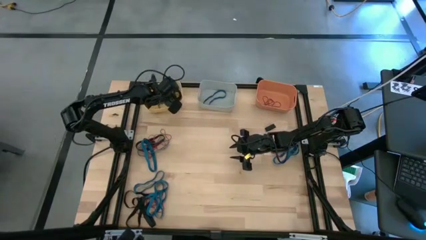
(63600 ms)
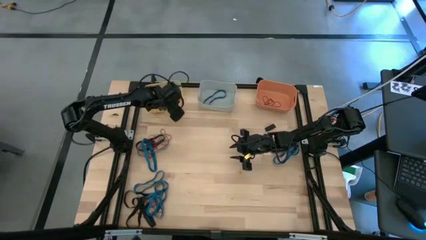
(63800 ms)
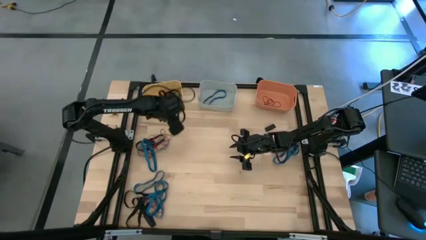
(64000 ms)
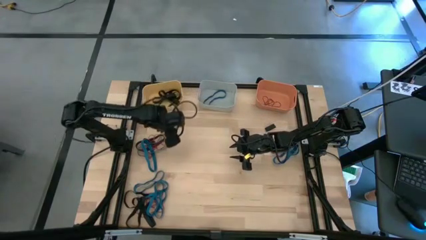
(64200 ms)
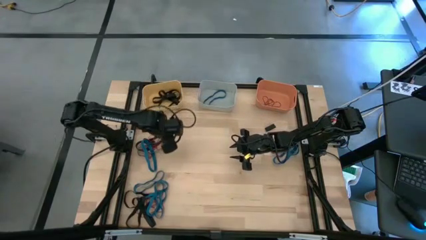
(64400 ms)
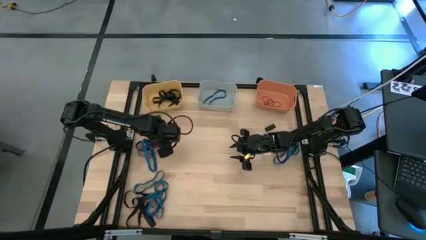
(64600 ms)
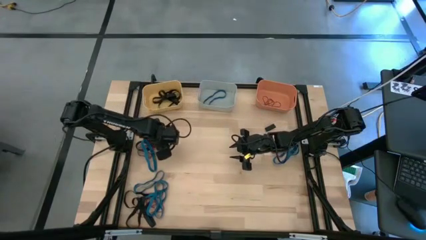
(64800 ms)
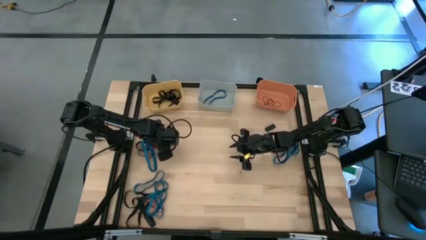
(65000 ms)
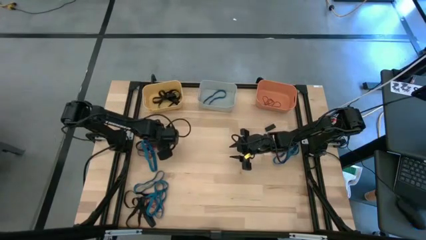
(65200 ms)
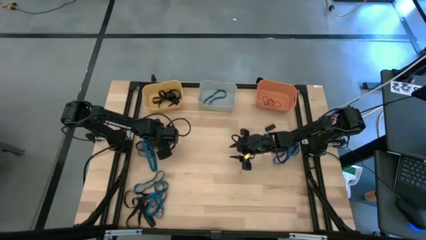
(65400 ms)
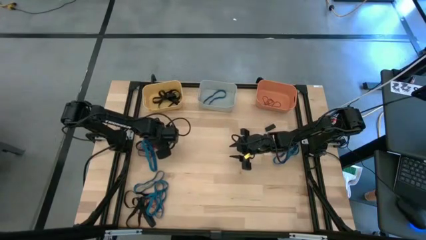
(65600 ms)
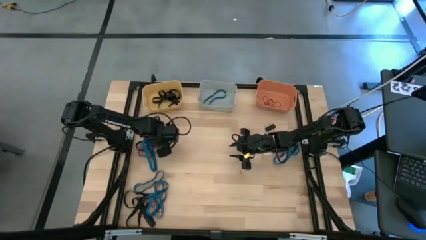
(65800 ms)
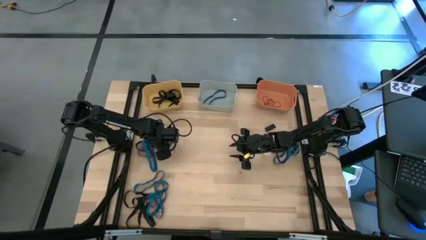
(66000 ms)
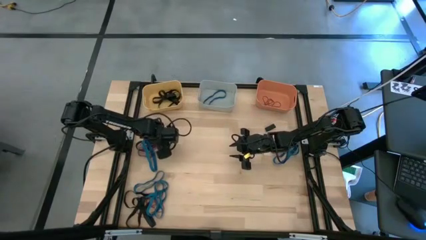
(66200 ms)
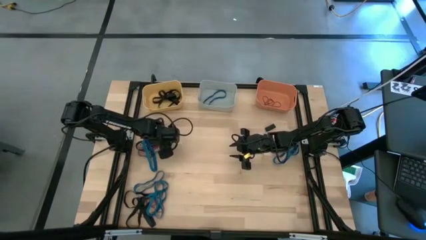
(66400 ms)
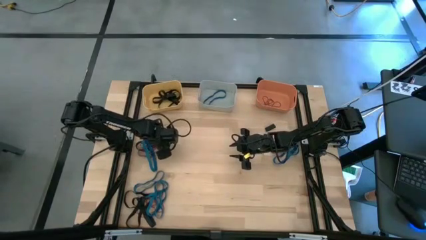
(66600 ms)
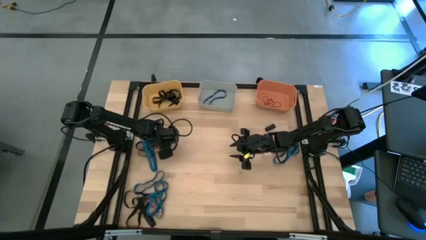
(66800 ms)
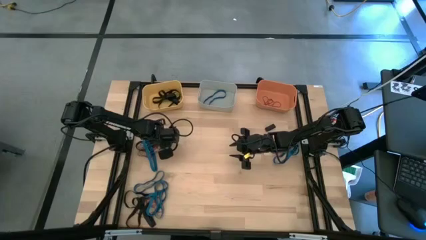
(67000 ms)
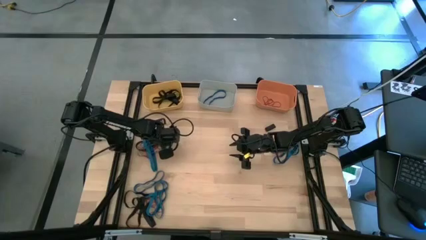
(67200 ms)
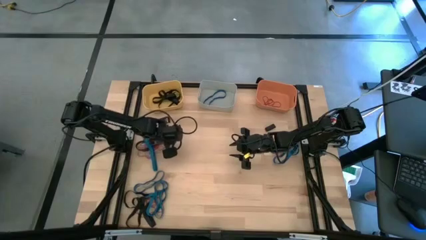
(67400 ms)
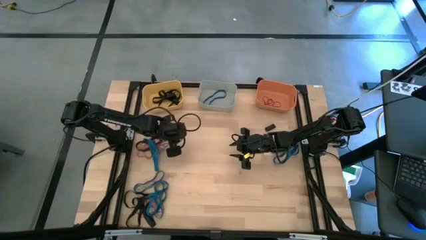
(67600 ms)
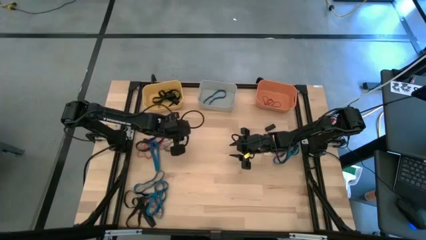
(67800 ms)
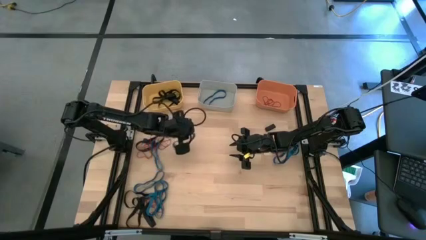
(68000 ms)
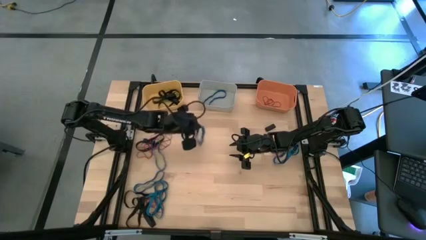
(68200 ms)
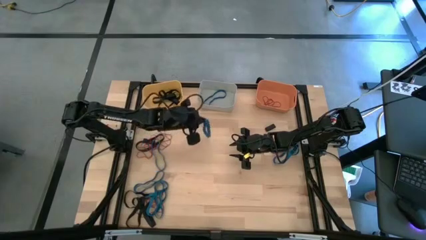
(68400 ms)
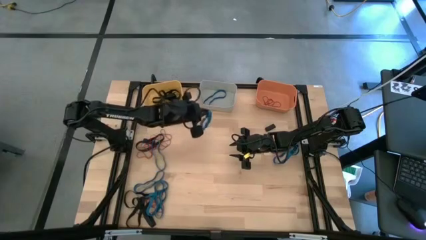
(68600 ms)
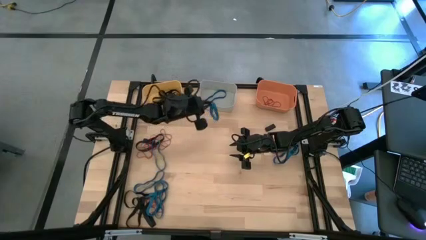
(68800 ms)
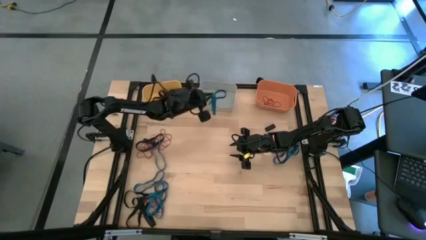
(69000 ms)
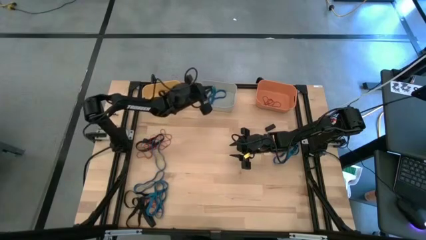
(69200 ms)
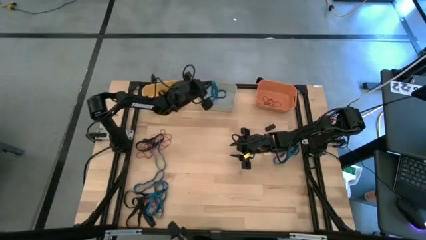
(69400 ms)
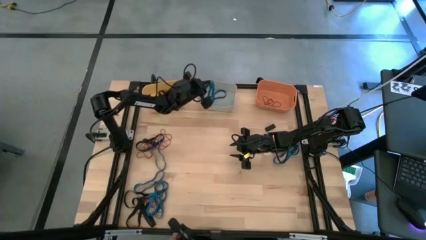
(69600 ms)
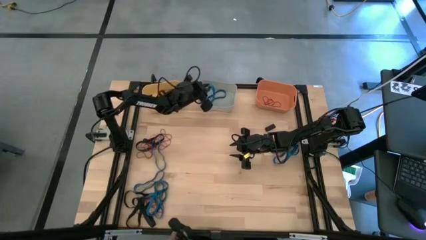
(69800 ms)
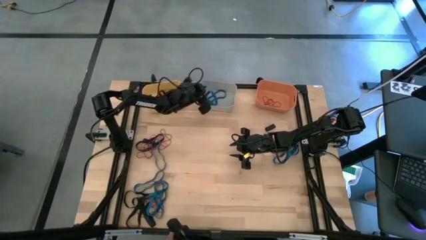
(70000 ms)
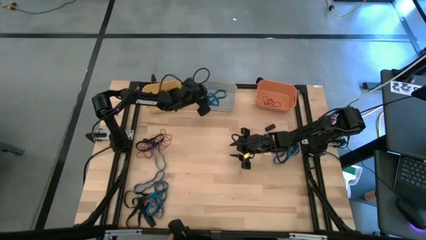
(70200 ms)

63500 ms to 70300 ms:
Task: Sort rubber bands into baskets
Put the blue rubber band into the grey bin

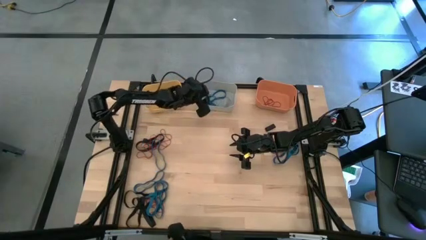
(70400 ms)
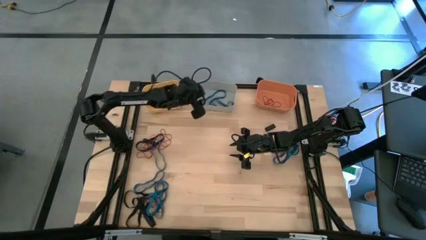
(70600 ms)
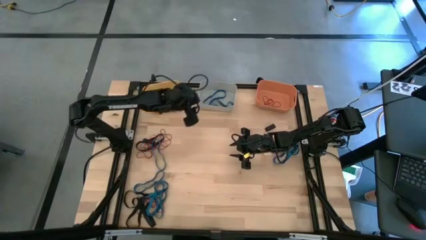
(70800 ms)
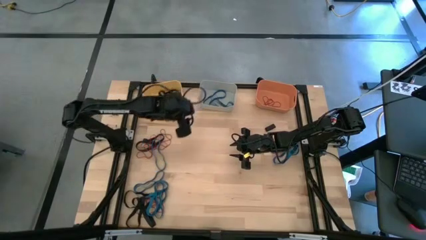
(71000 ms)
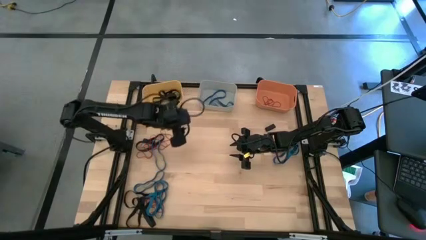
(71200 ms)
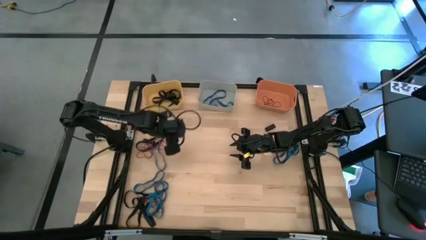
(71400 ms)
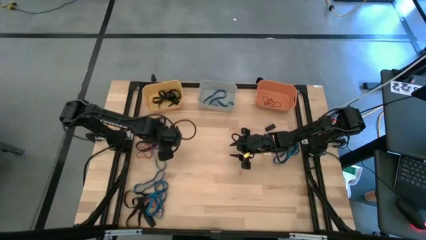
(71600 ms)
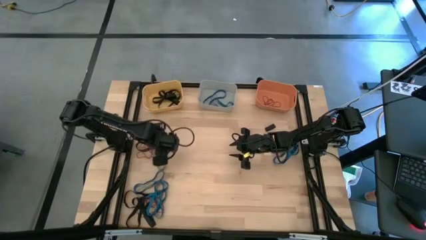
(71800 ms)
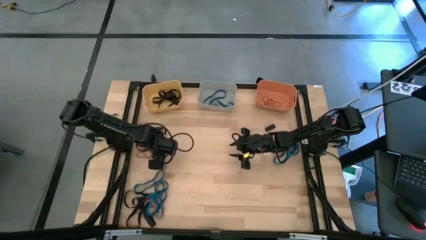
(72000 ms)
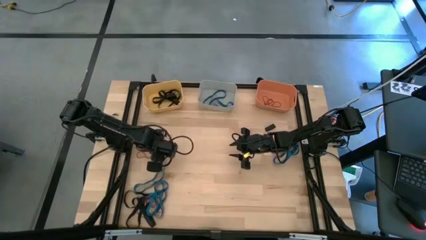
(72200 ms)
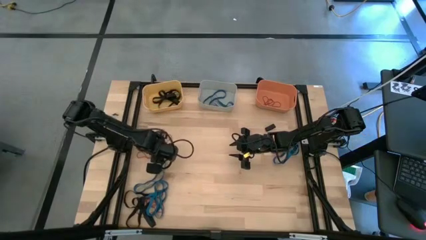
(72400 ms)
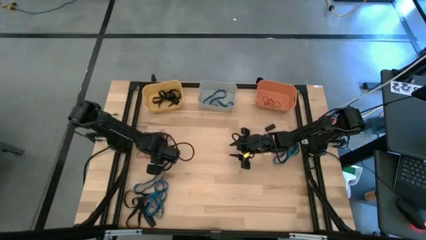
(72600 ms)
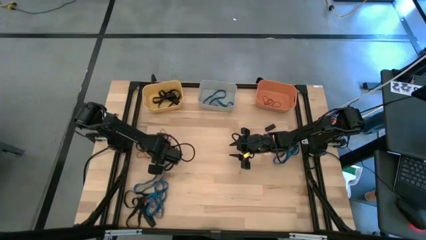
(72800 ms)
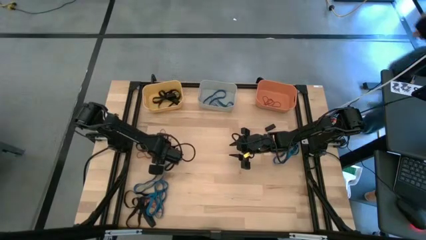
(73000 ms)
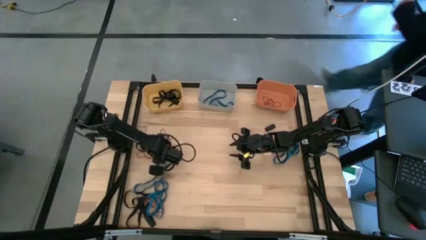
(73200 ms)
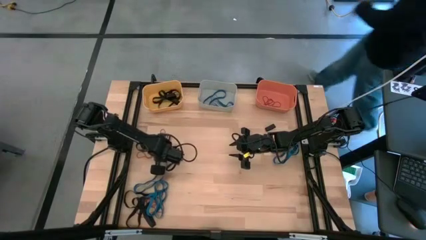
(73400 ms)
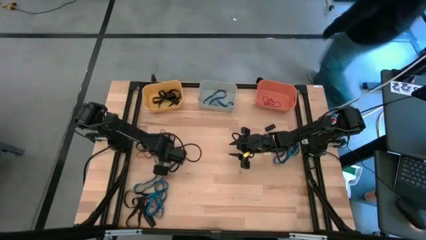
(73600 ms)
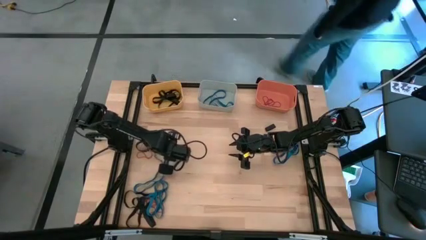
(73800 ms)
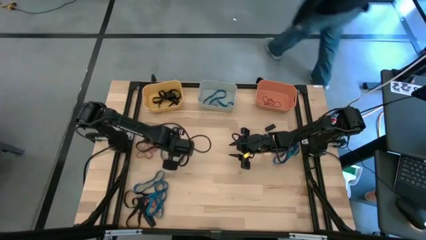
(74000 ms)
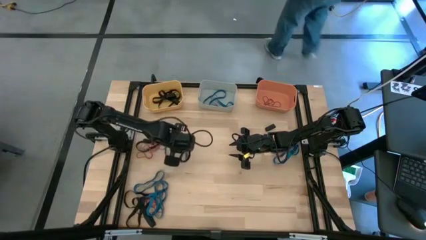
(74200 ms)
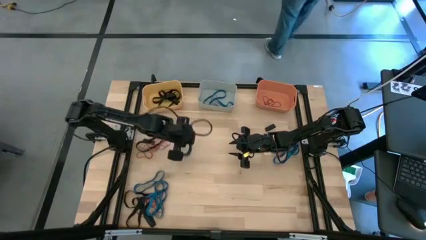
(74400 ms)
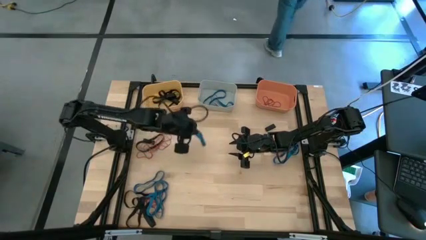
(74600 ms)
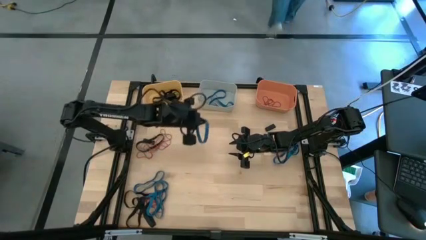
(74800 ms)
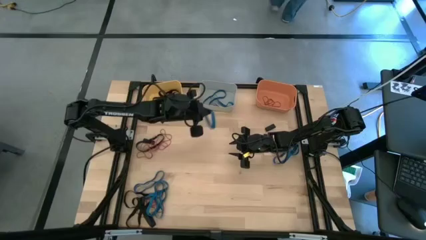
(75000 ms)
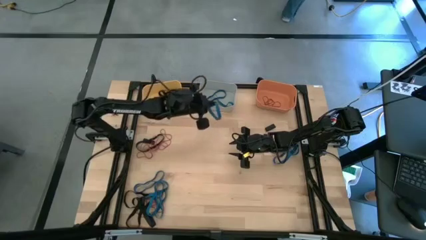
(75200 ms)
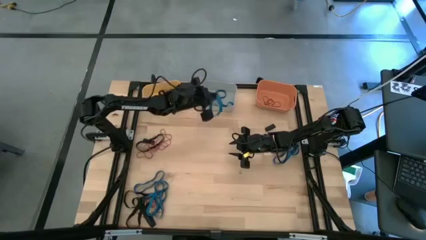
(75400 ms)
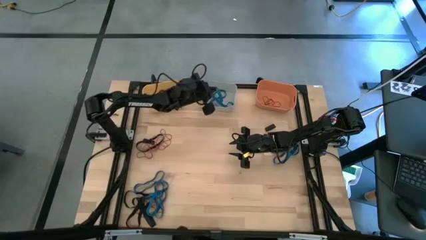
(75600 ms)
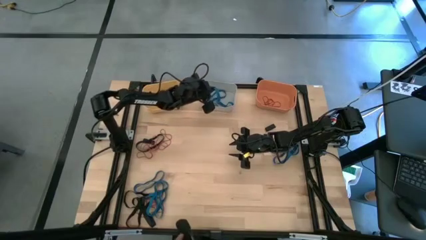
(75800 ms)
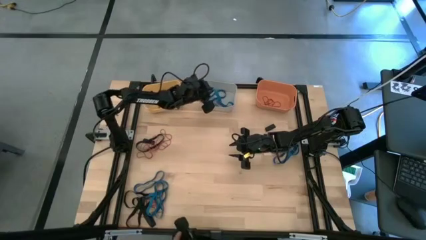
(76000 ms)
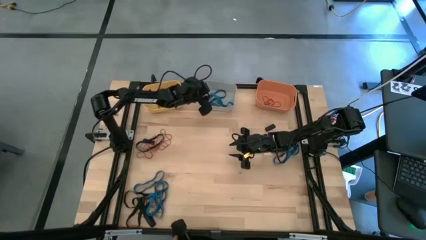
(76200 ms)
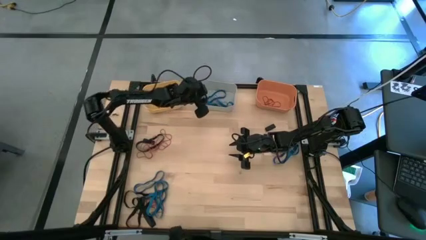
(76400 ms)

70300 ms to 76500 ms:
Put the blue rubber band into the grey bin

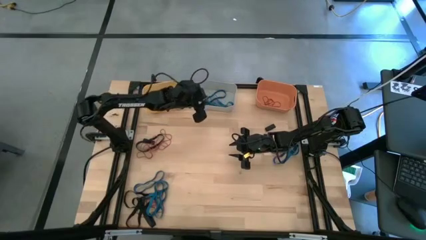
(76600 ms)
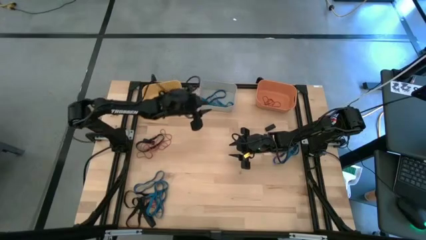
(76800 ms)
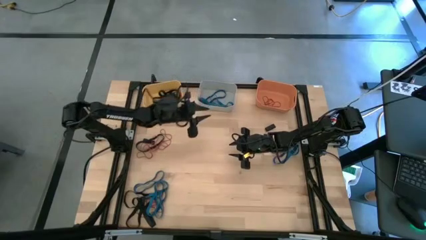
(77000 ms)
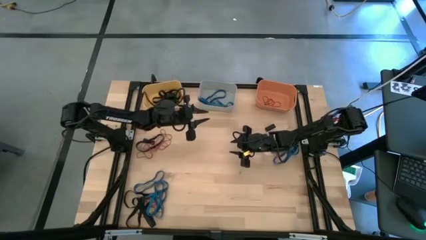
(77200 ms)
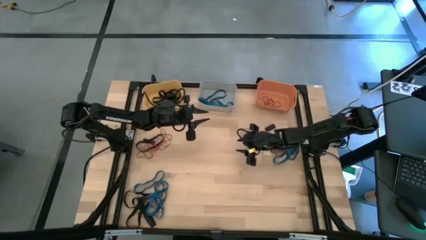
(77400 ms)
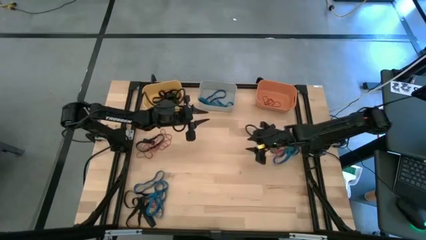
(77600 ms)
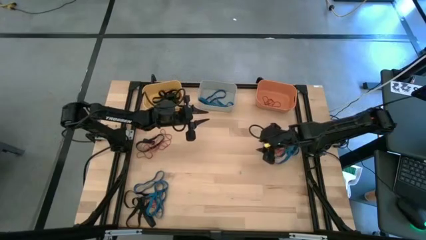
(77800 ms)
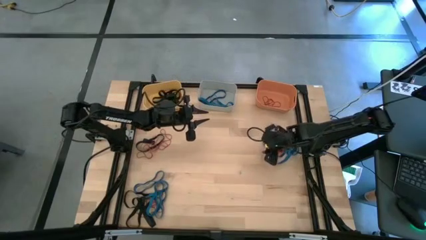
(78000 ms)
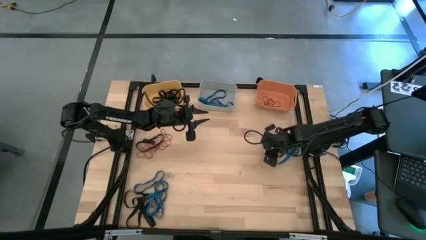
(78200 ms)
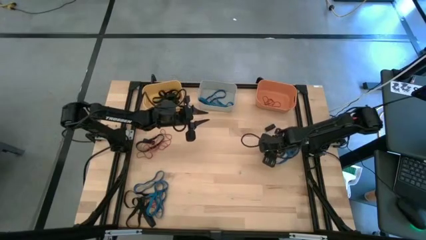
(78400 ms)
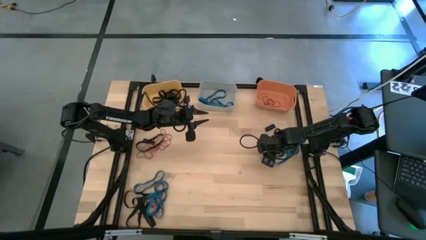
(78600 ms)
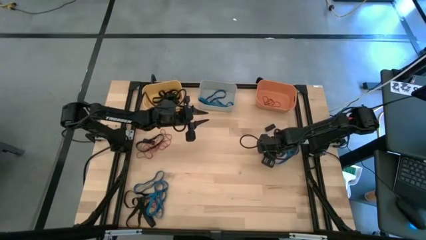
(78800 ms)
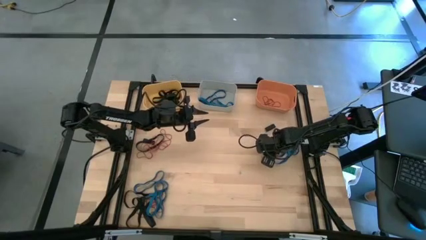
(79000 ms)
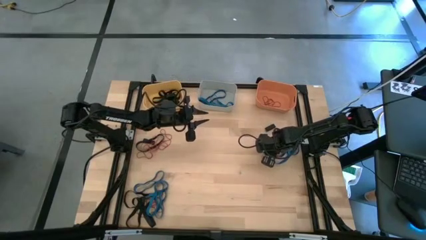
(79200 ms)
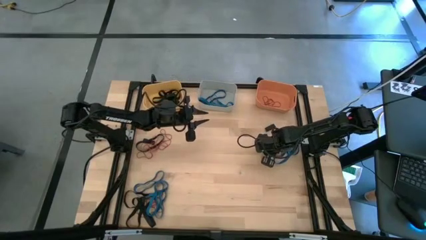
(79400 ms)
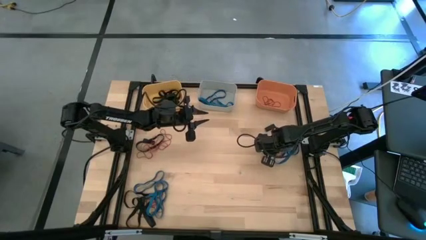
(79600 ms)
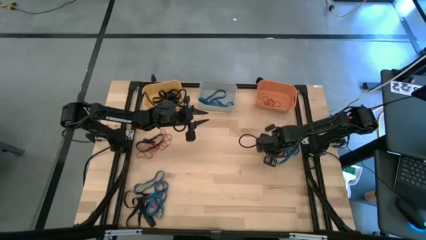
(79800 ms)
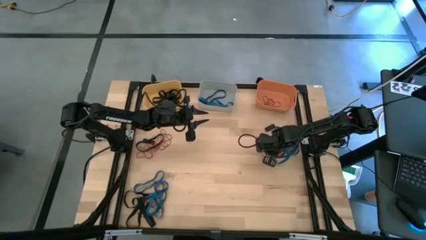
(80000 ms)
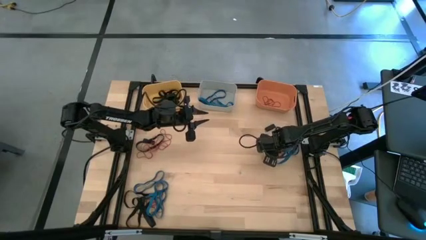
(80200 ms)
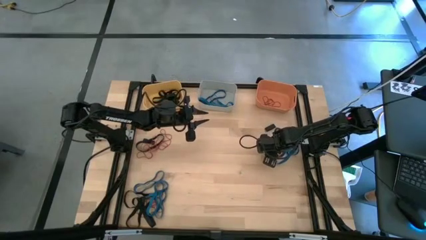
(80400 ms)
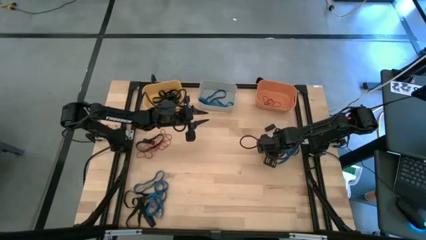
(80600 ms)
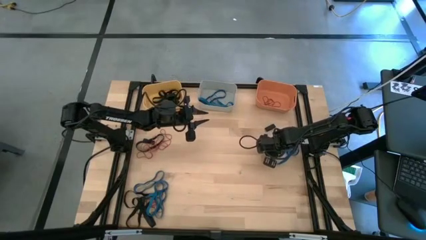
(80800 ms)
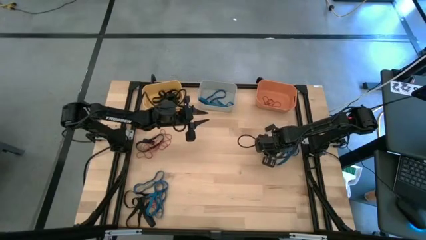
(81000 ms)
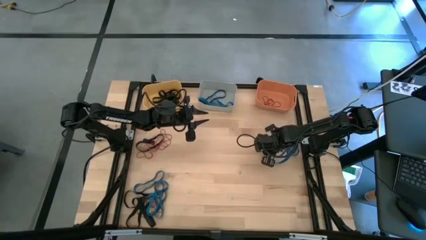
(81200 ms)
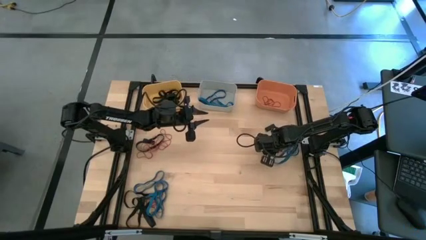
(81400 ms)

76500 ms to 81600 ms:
Put the red rubber band into the orange bin
